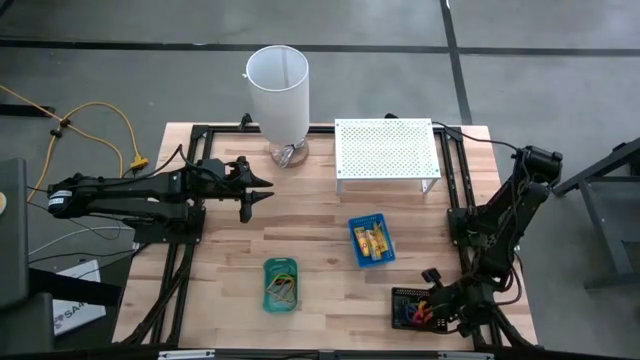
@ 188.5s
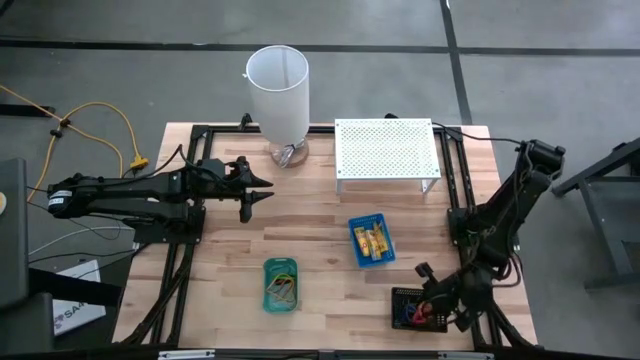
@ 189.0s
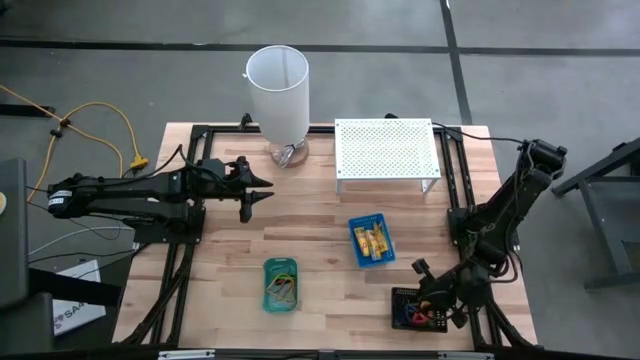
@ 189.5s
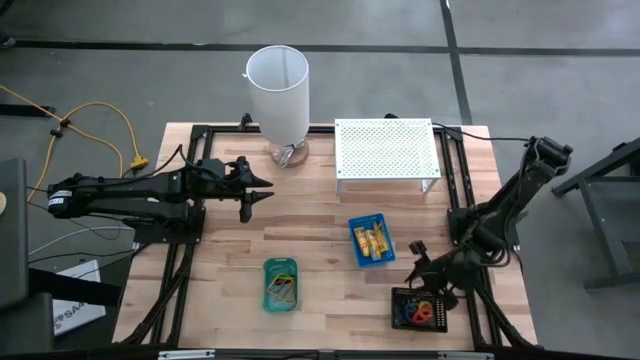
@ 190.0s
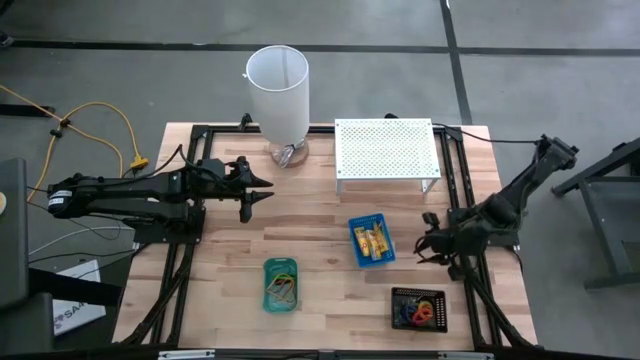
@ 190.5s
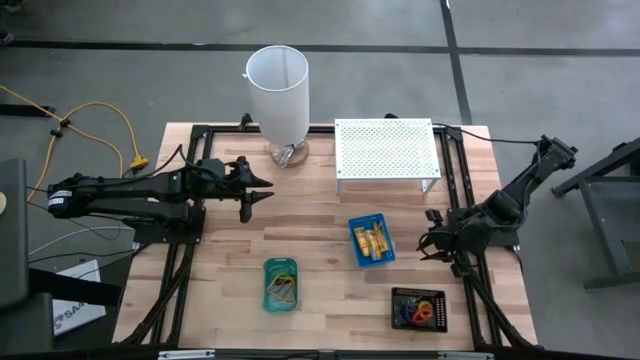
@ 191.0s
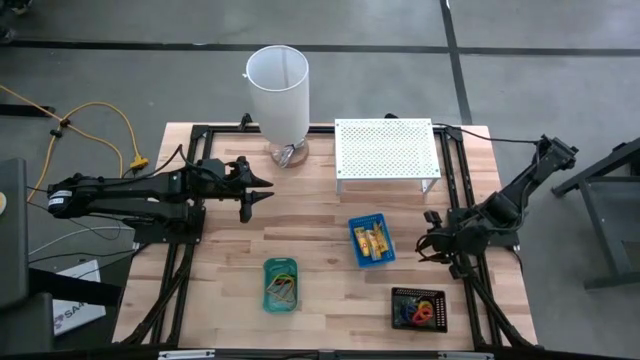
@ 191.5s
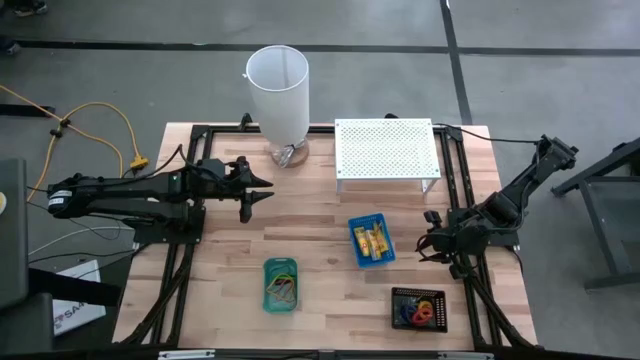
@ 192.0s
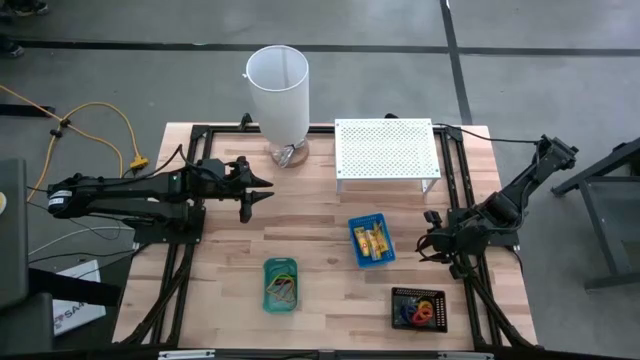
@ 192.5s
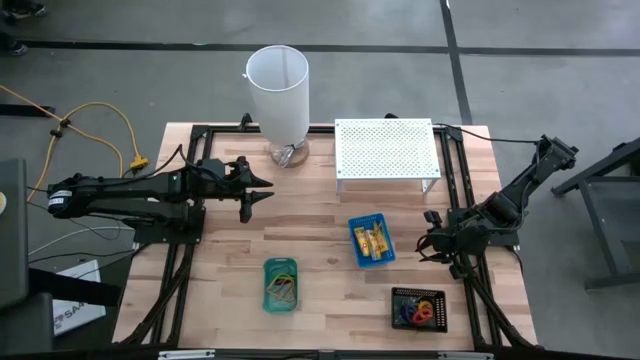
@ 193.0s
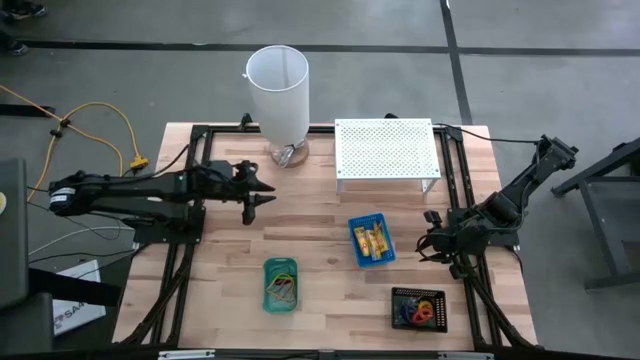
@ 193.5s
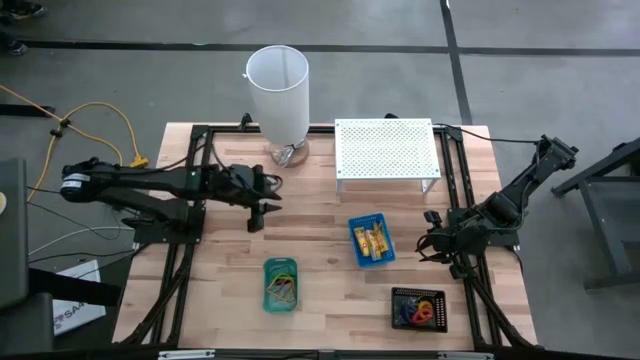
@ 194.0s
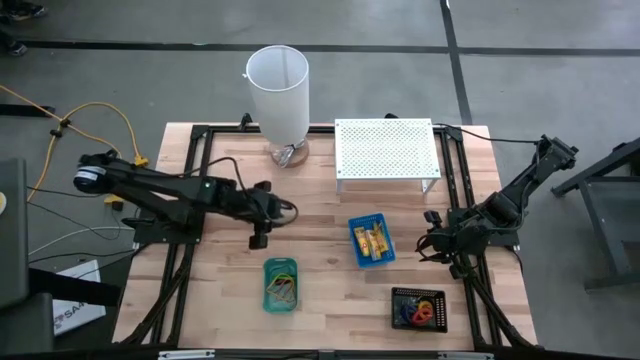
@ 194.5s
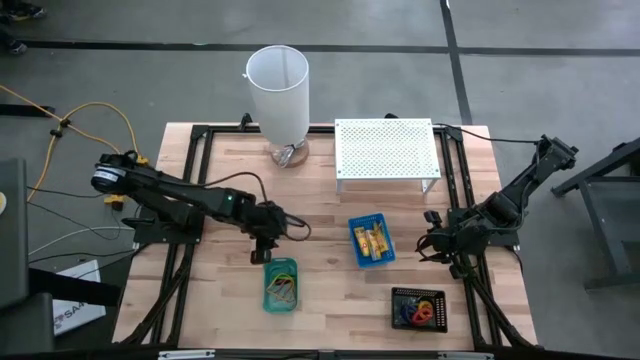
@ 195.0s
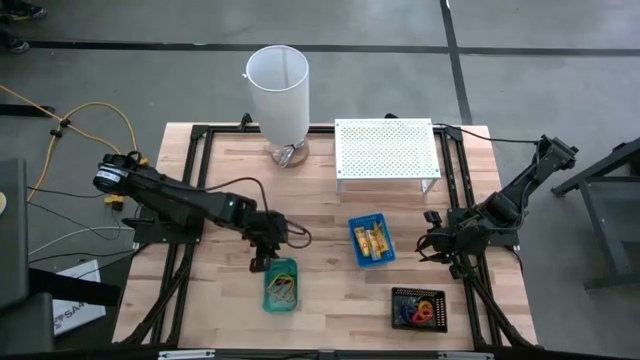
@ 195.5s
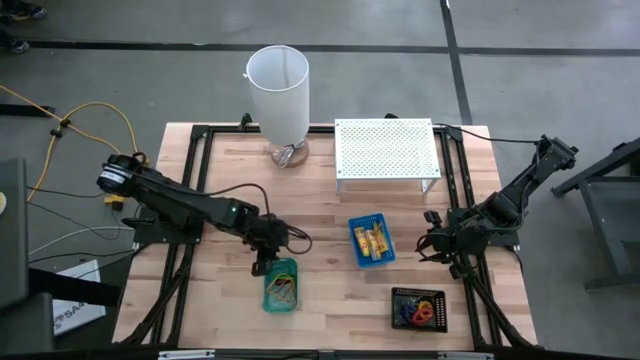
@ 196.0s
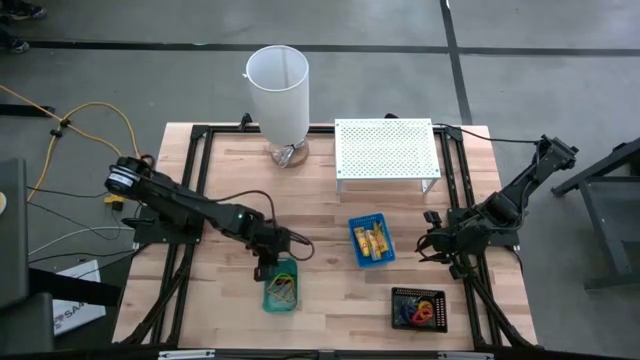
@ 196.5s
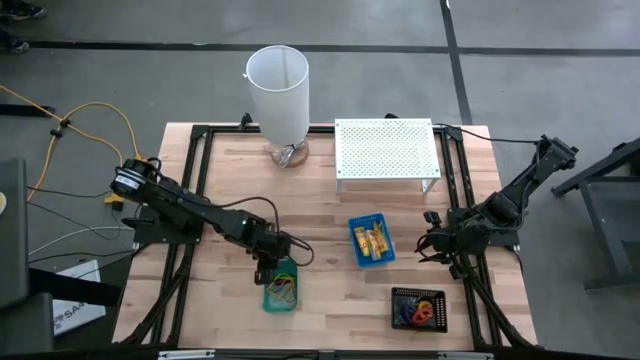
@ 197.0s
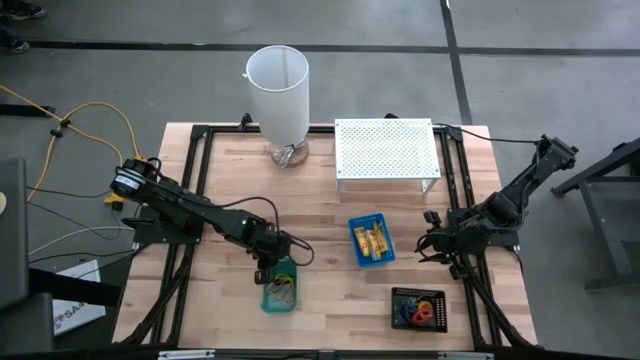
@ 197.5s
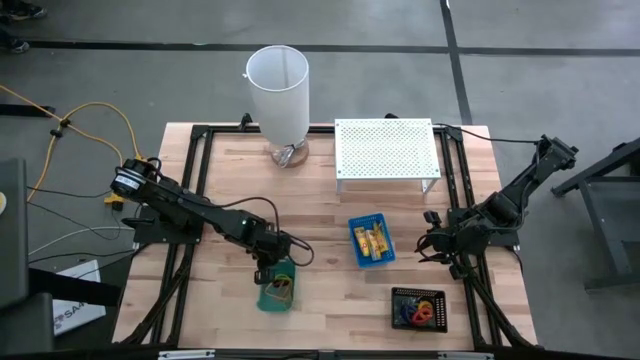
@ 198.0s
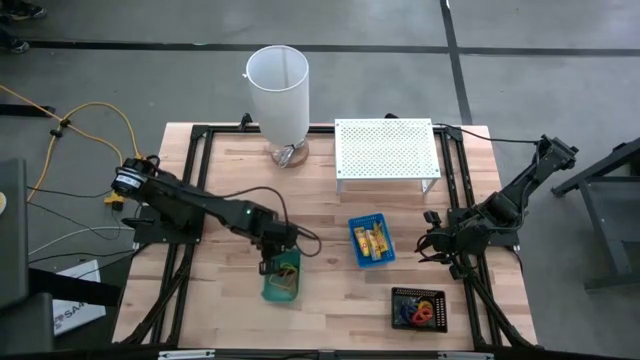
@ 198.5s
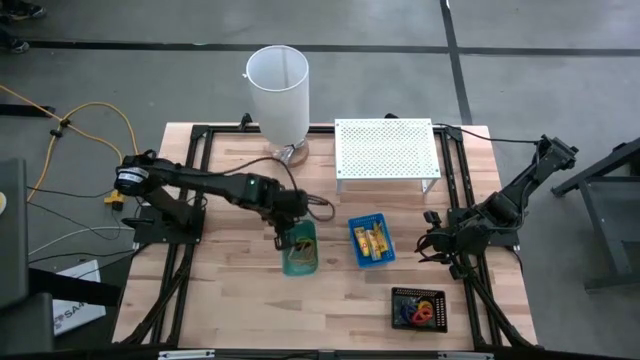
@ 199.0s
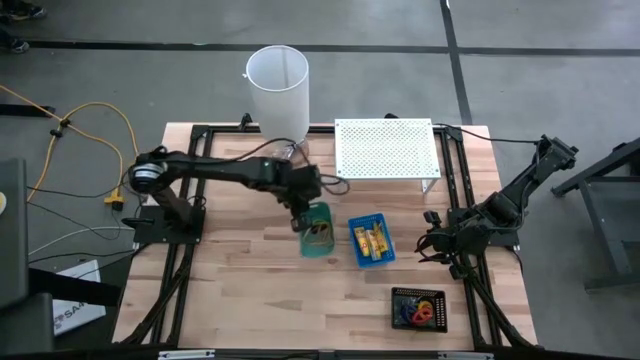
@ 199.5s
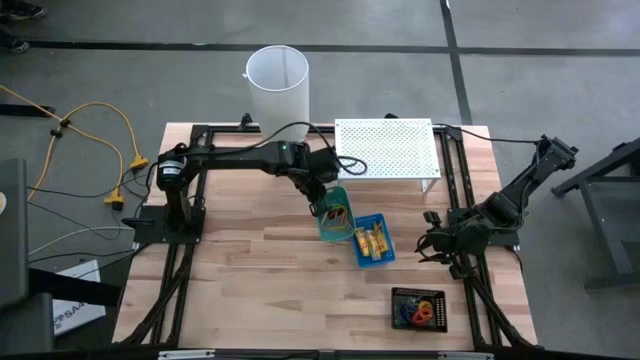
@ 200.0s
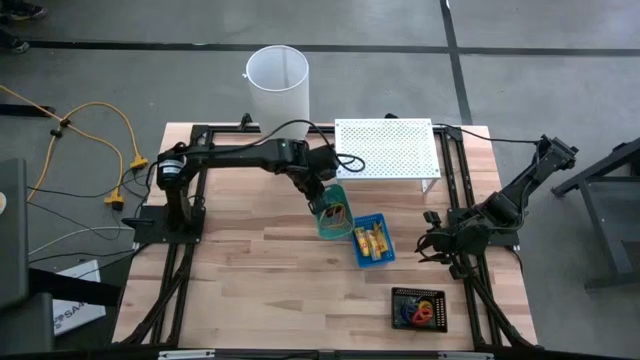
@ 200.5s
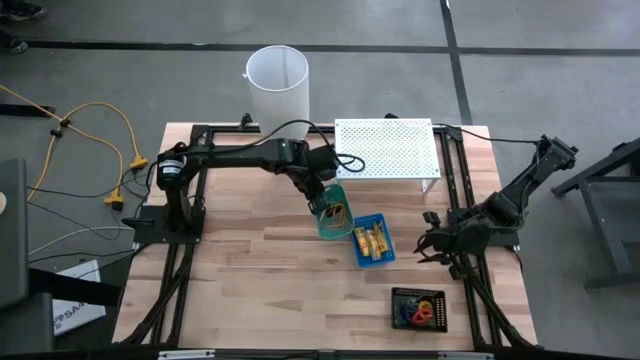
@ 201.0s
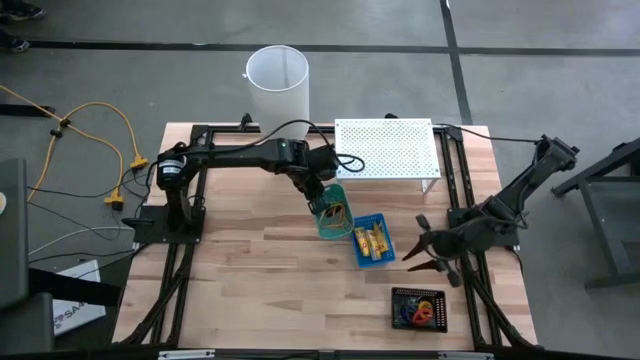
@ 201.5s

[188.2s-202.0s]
Task: Pick & Place Office Desk Supplies
Put the green bin on the shelf

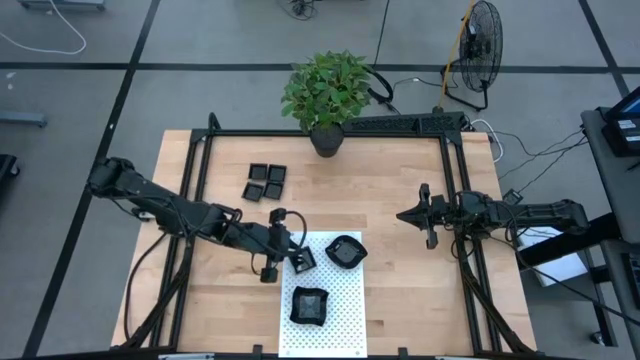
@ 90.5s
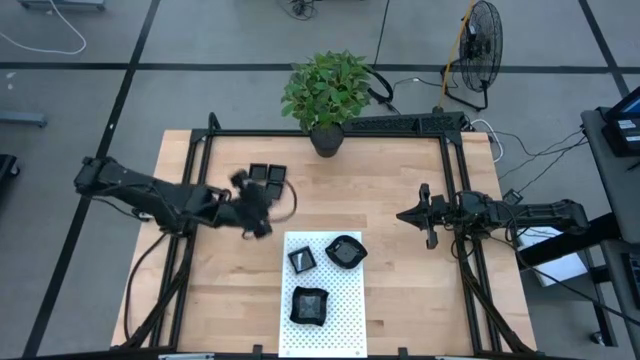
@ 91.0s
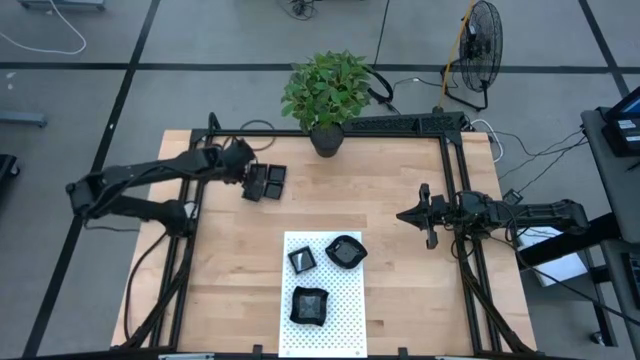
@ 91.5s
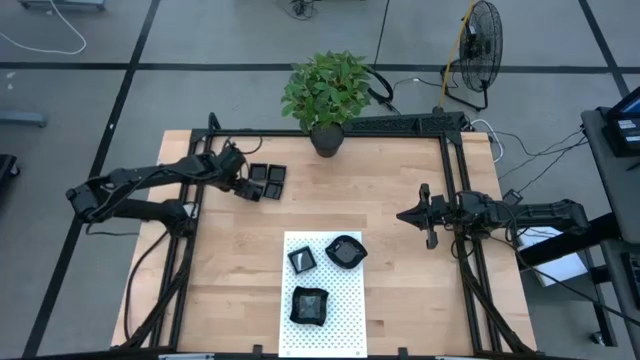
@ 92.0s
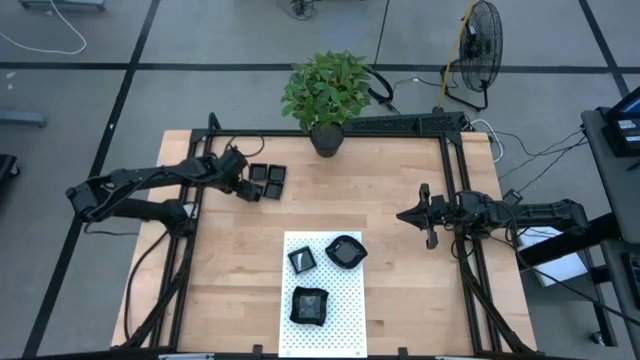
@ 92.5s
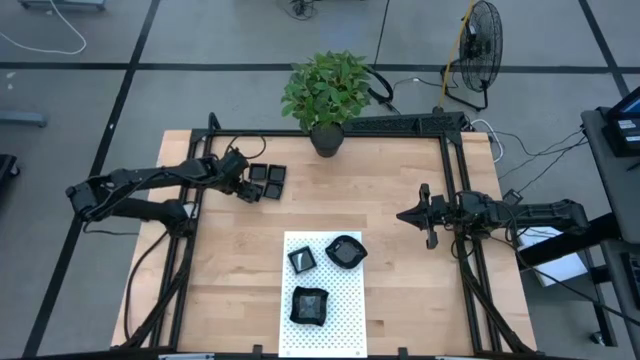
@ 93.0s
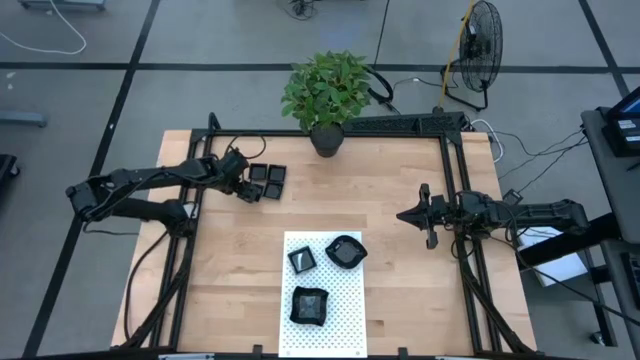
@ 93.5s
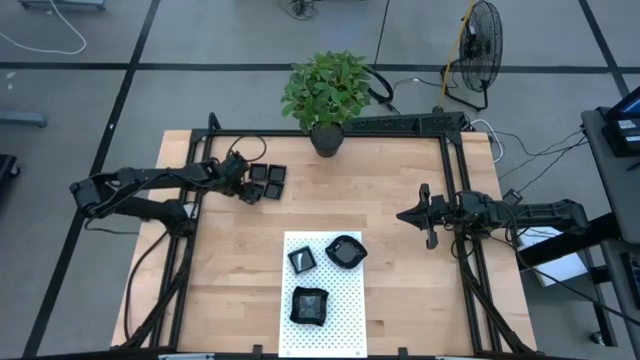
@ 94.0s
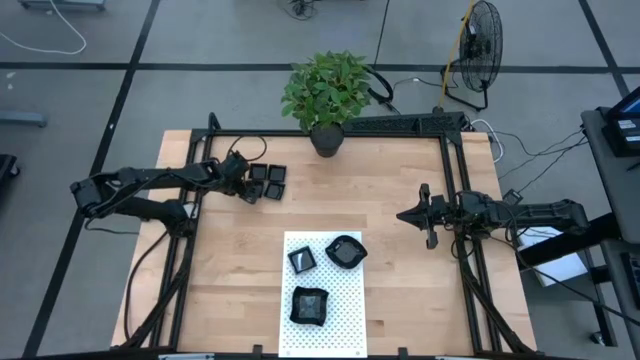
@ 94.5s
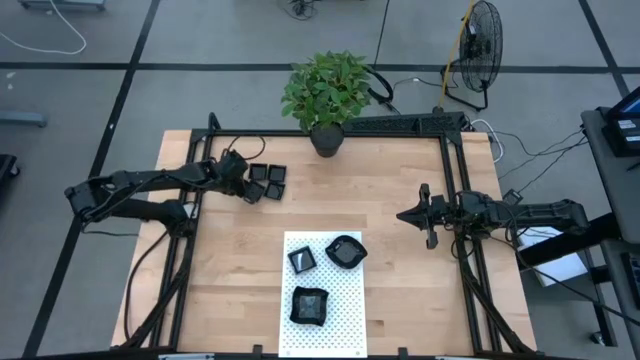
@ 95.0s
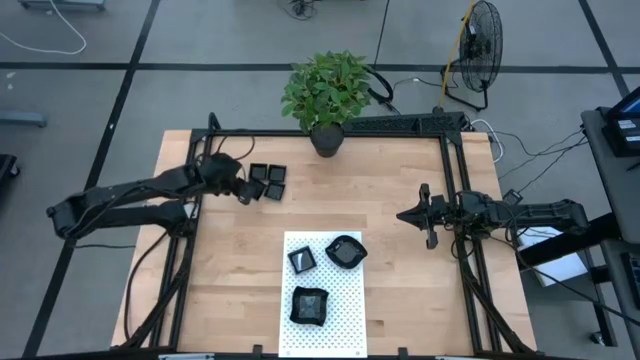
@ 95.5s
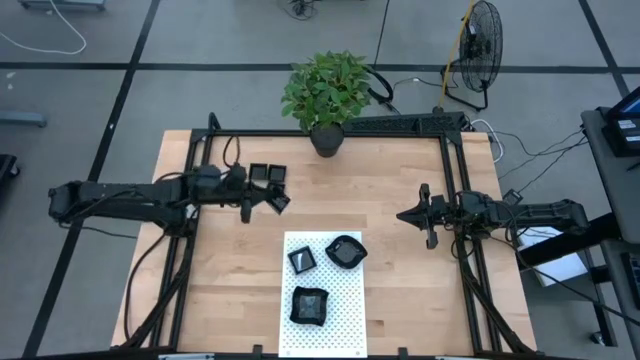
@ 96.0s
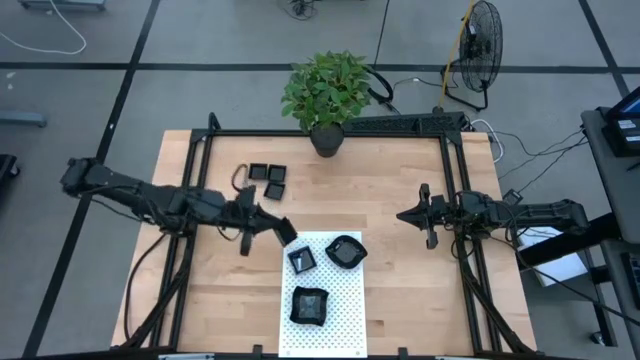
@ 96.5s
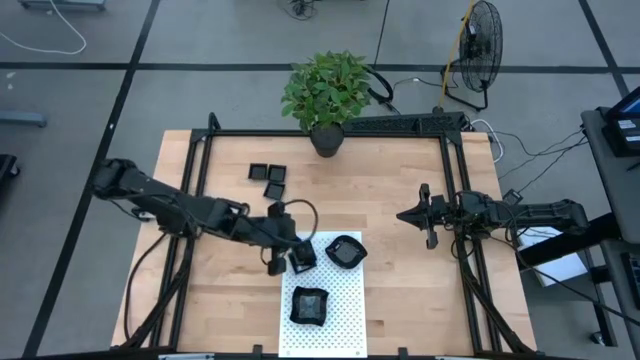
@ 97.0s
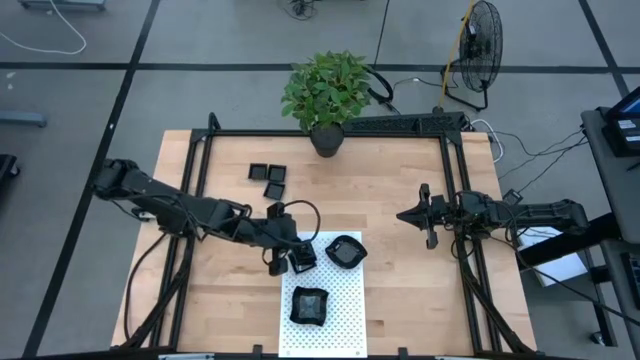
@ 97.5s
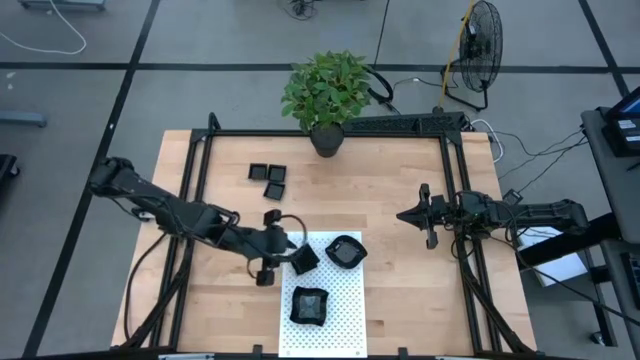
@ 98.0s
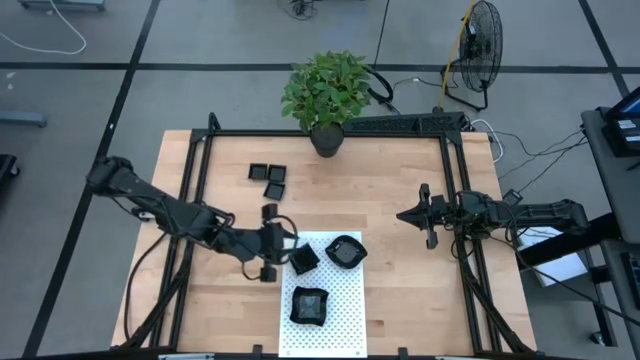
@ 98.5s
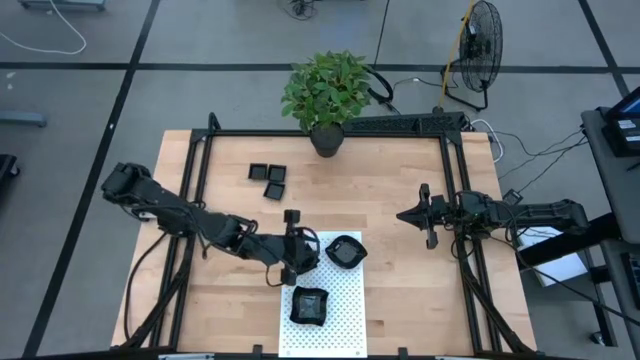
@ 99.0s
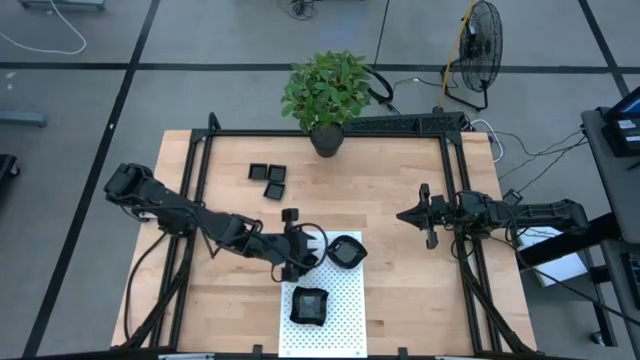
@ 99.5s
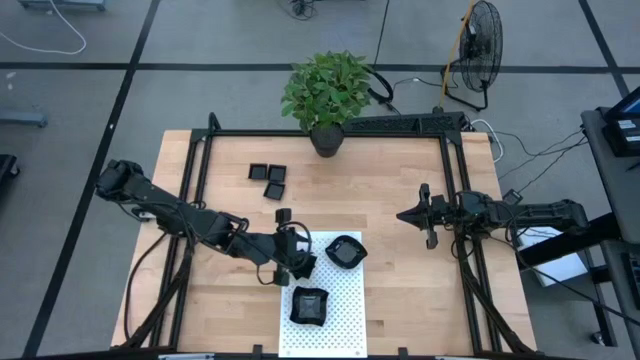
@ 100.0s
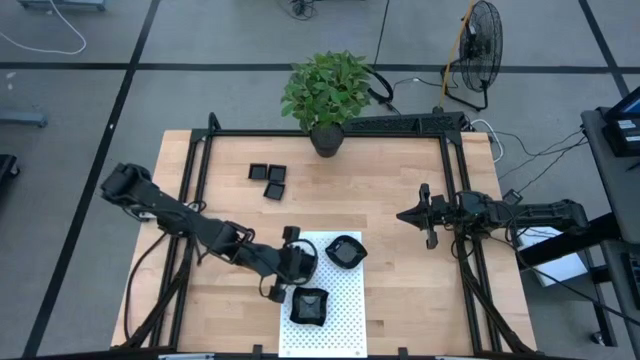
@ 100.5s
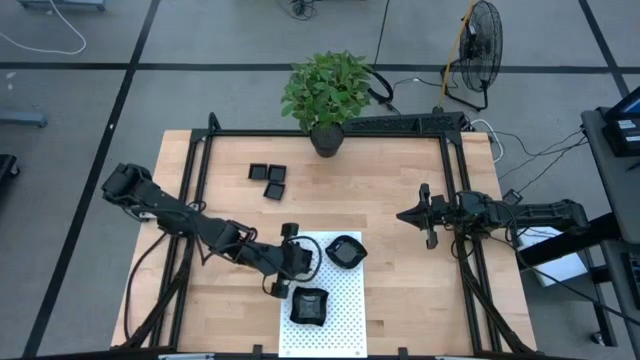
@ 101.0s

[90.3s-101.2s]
Task: Pick & Place Mini shaped plates
Stack the square plate on top of the square plate on the shelf
